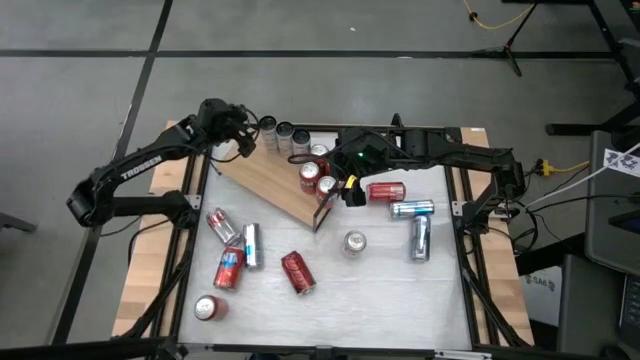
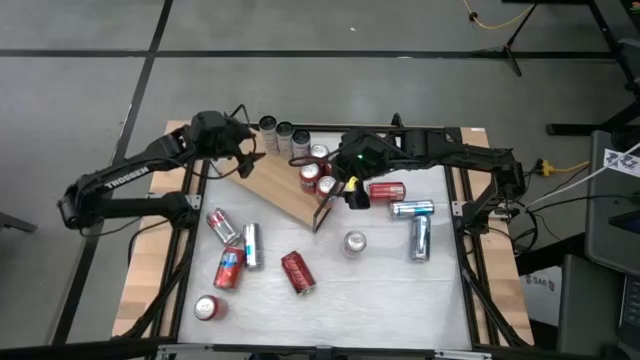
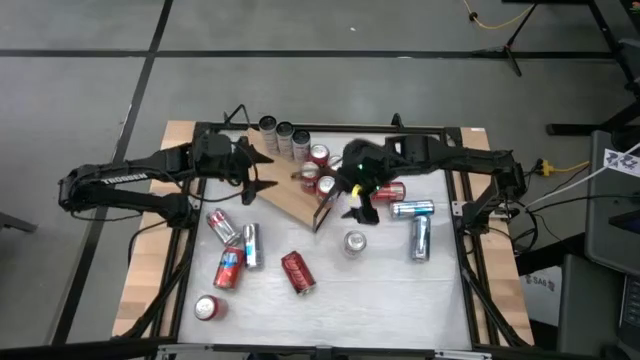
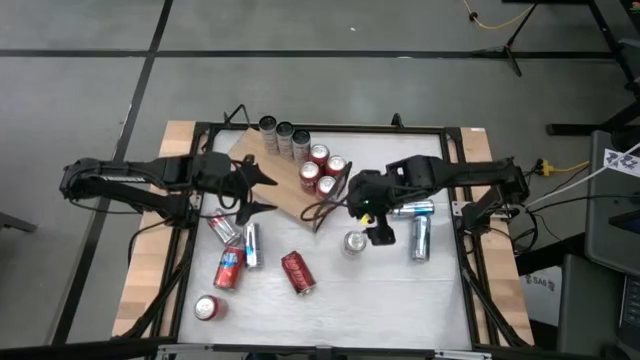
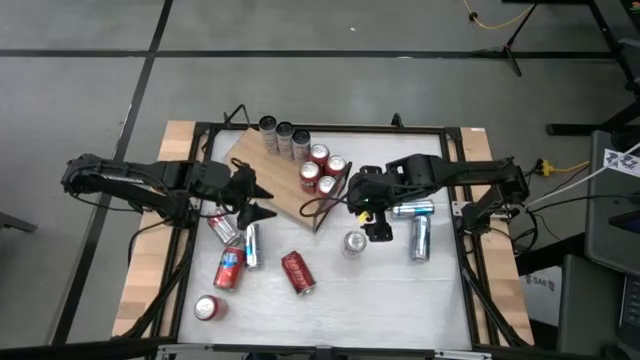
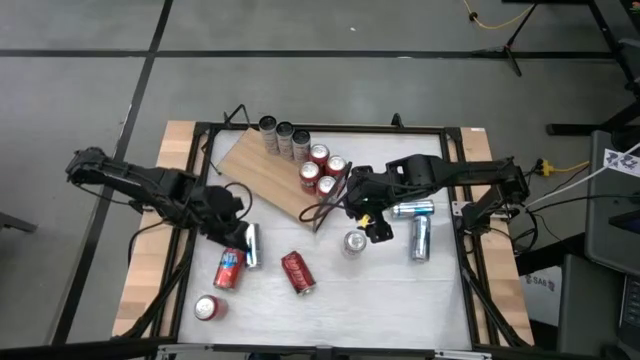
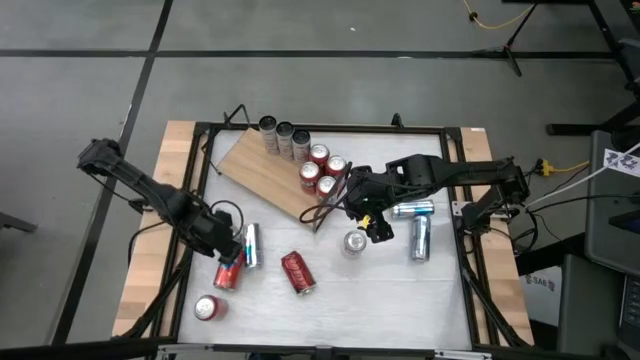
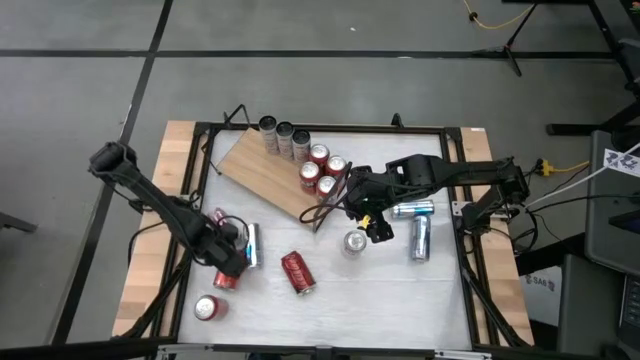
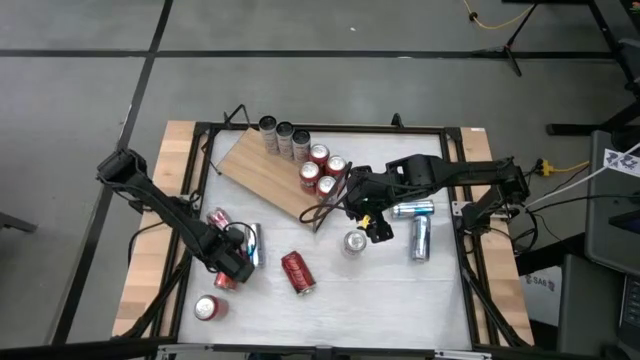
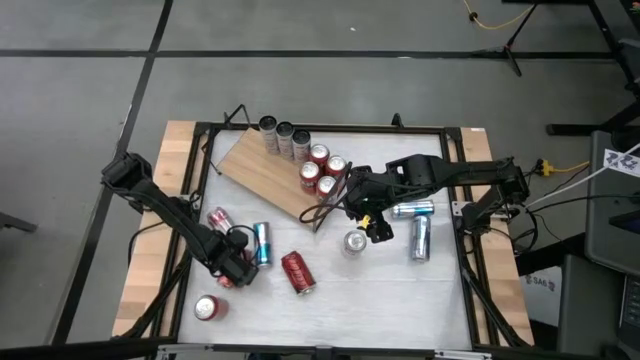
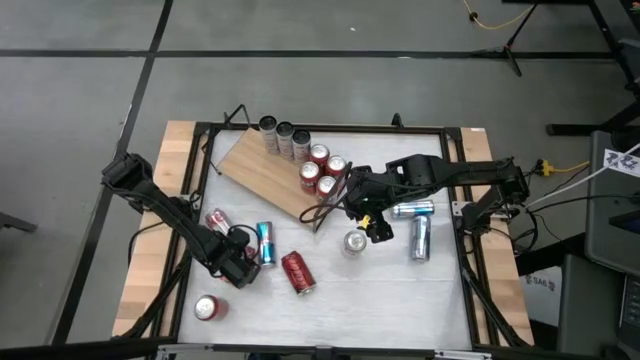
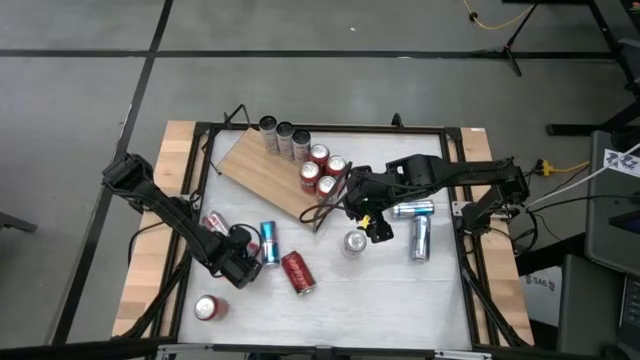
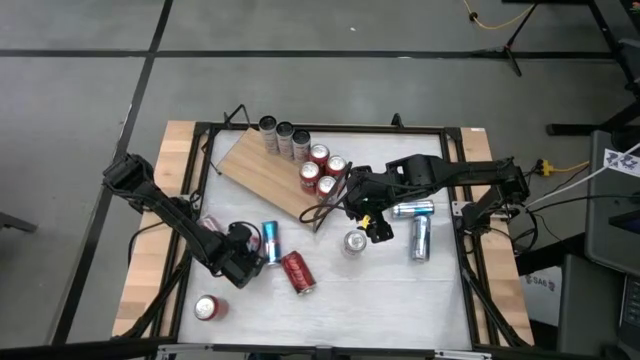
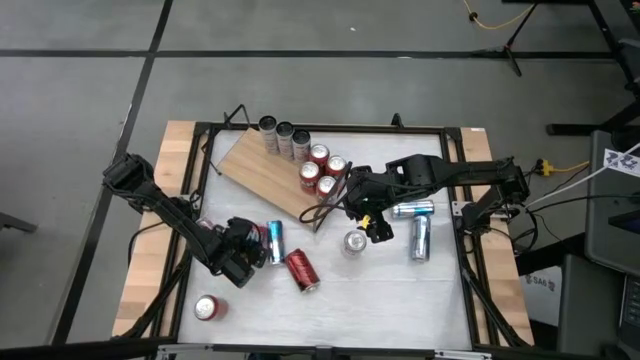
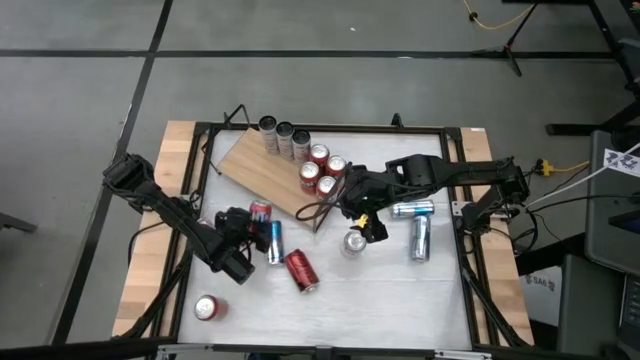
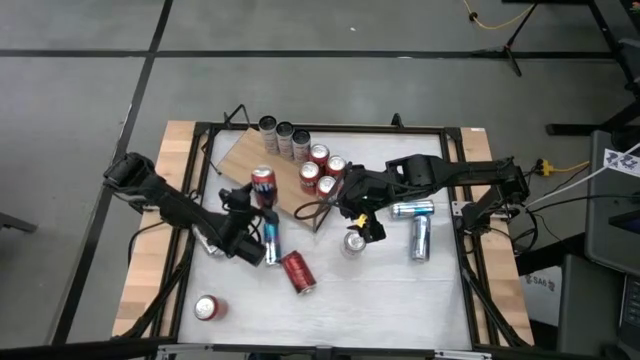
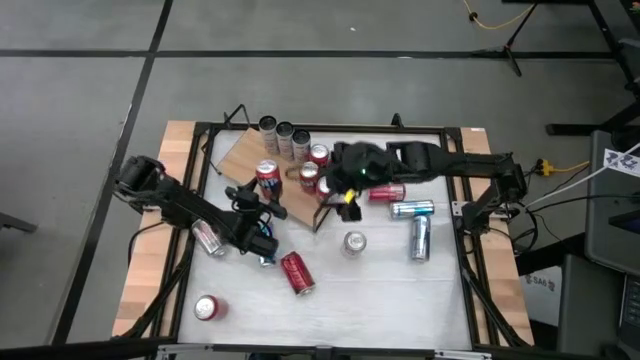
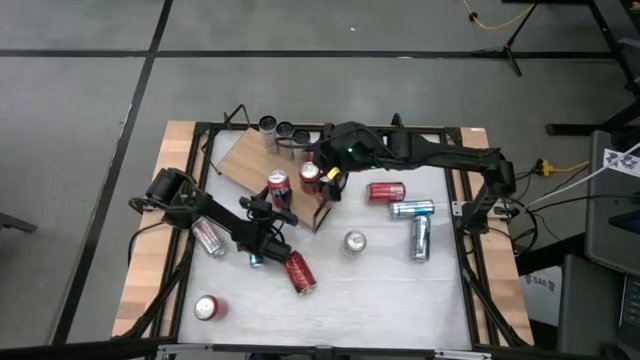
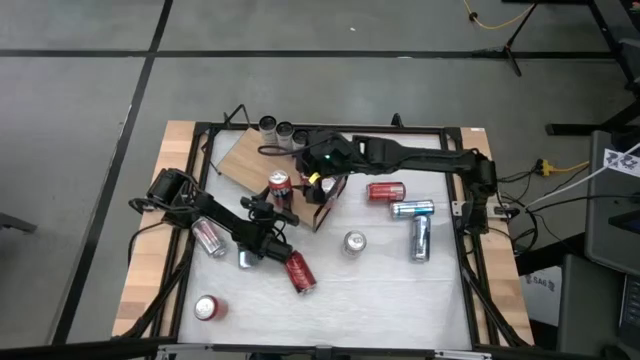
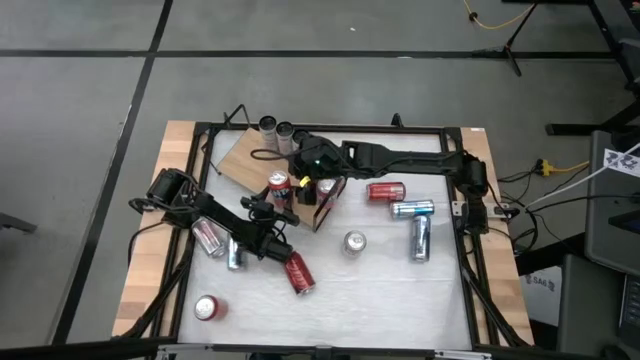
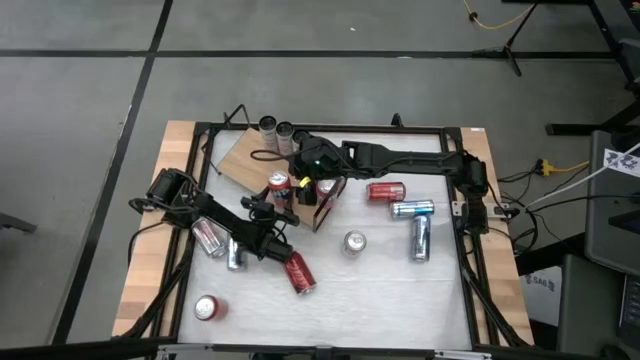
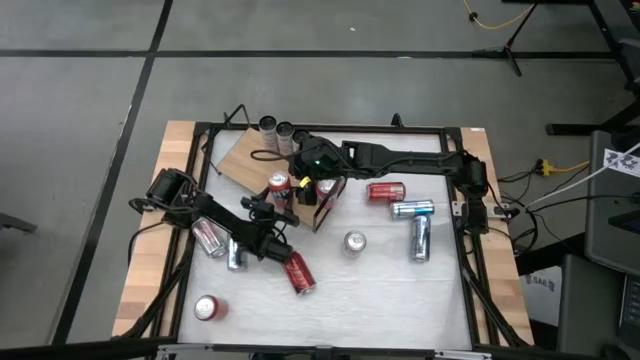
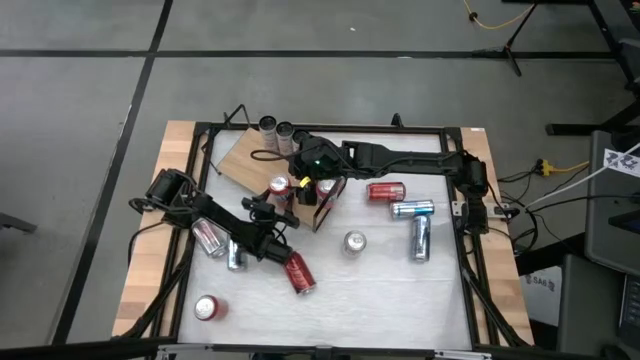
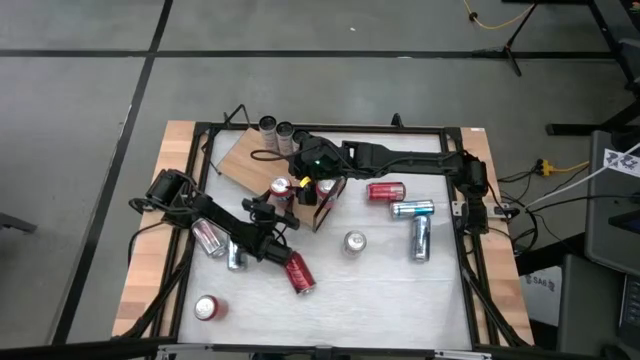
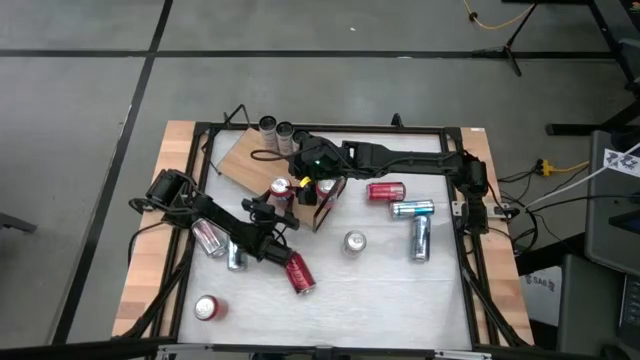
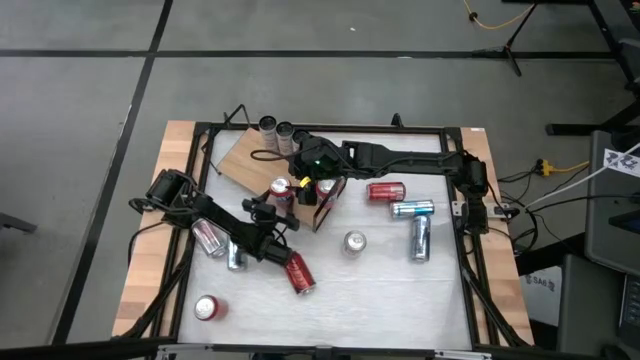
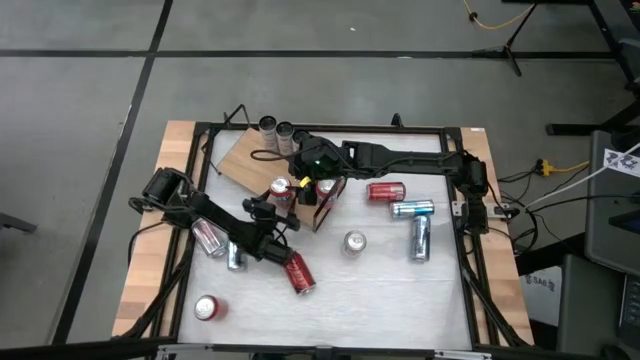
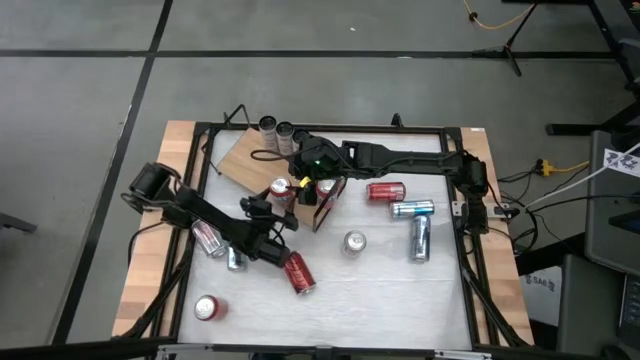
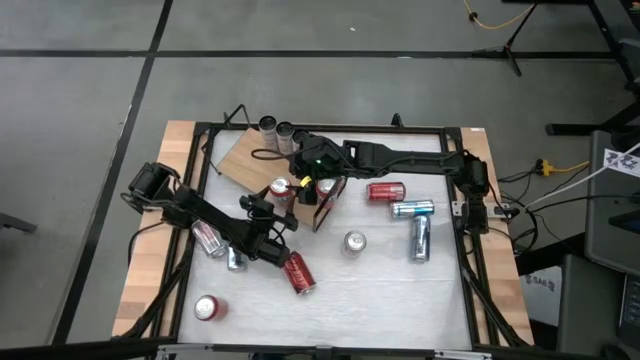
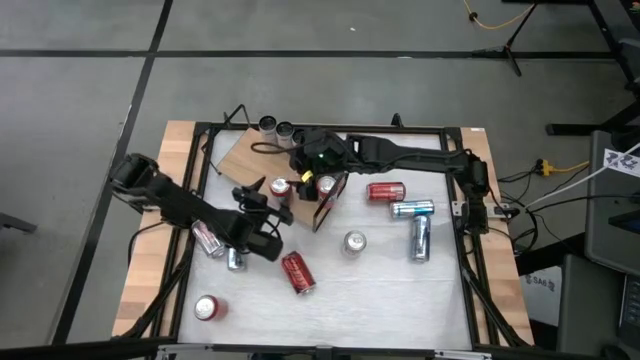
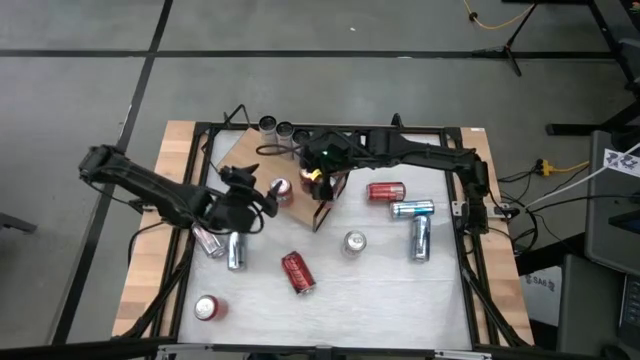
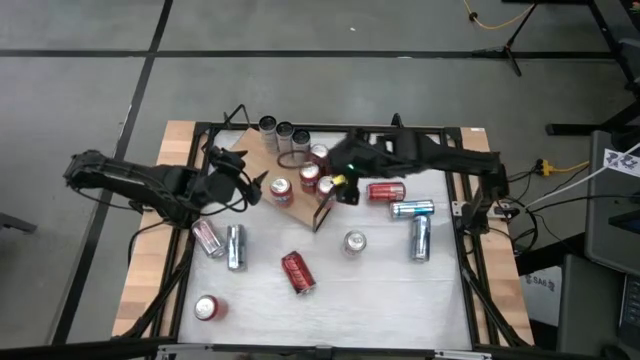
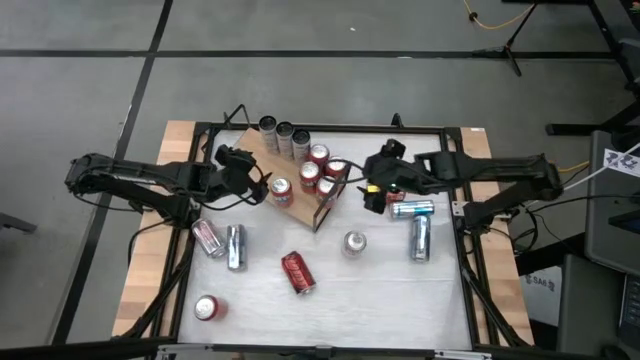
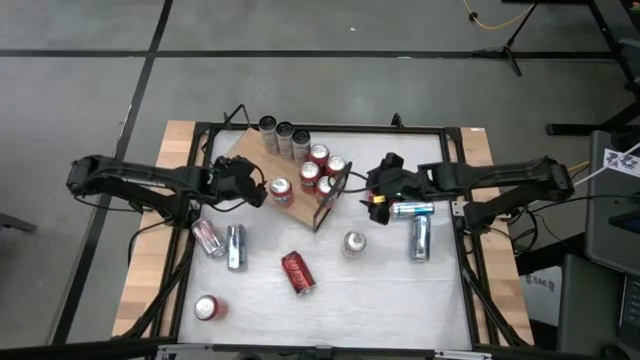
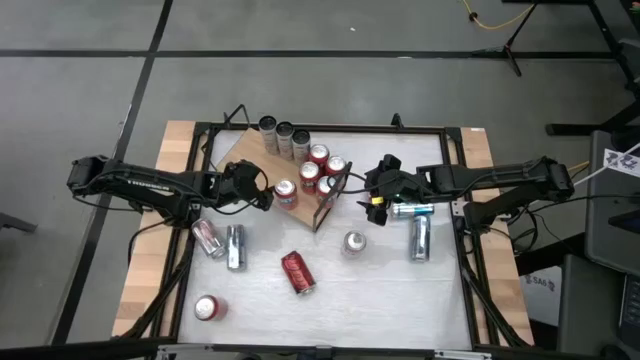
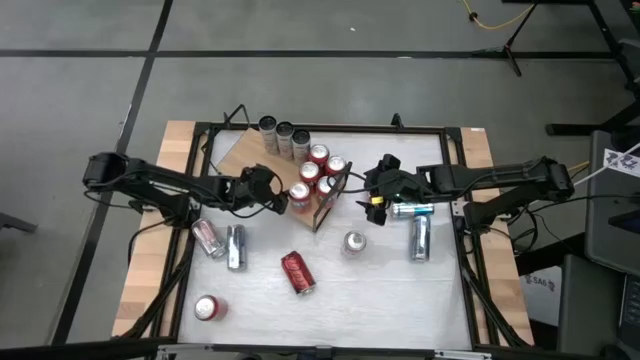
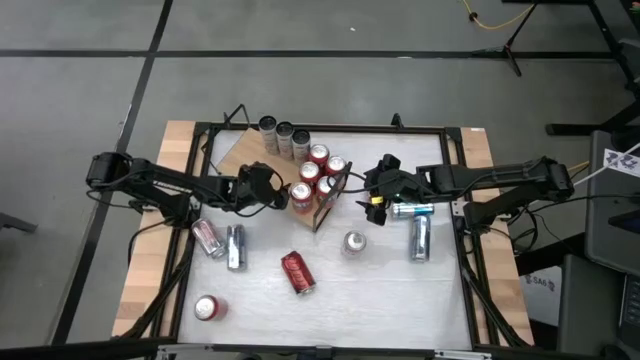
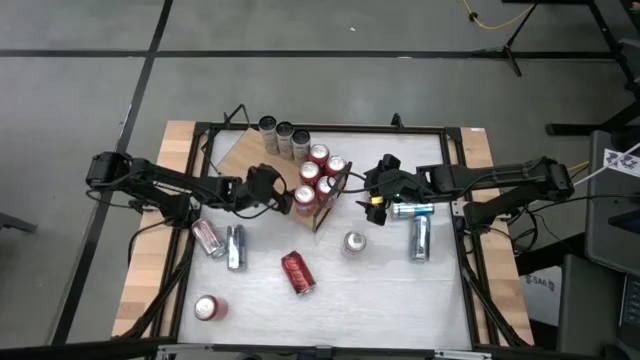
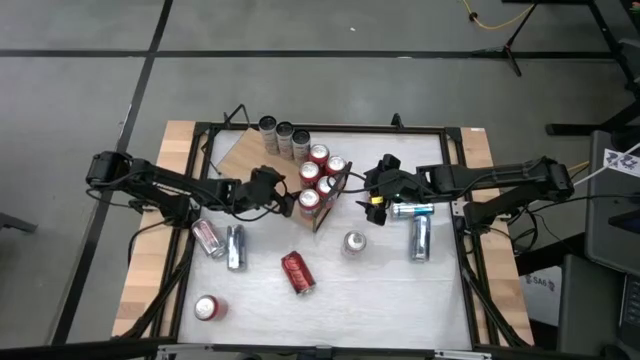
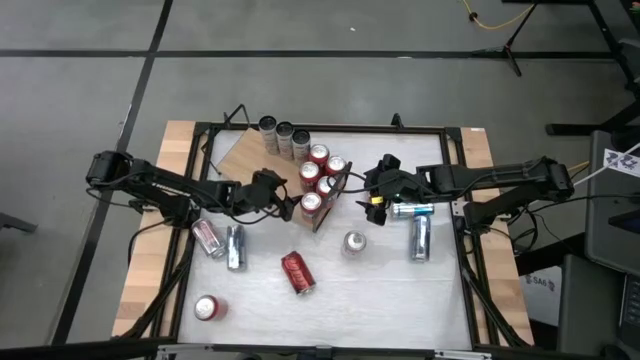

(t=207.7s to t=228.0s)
Task: Pick and place cans onto a shelf
Put the top red soda can on the shelf and align with the other red soda can

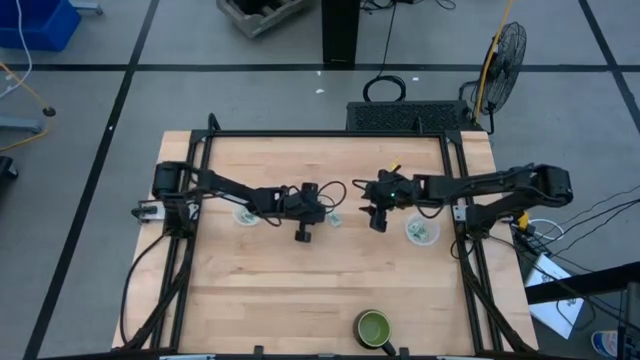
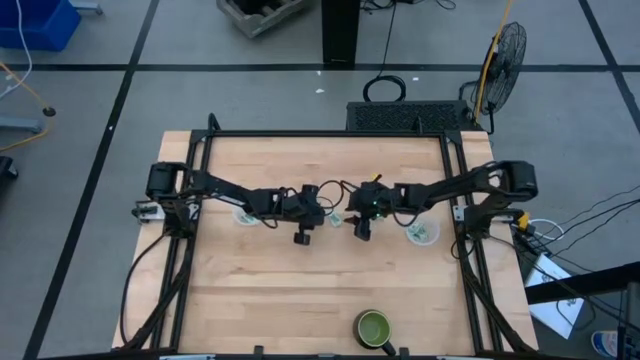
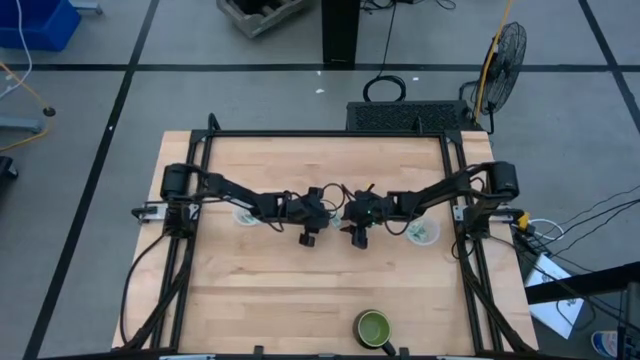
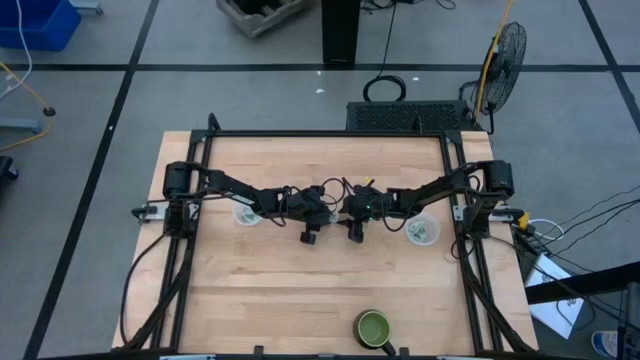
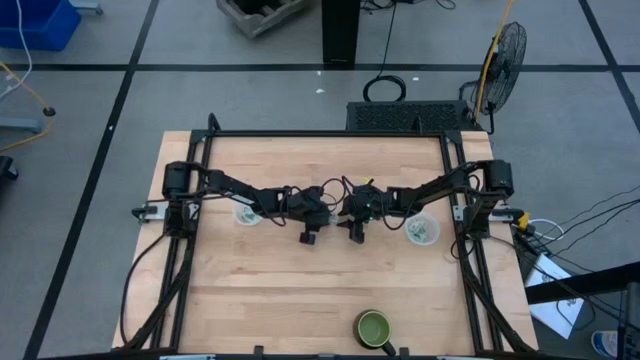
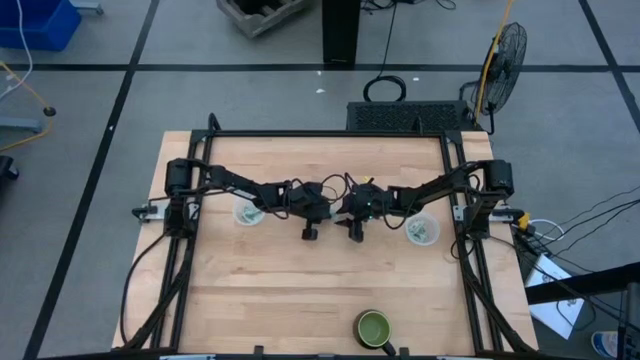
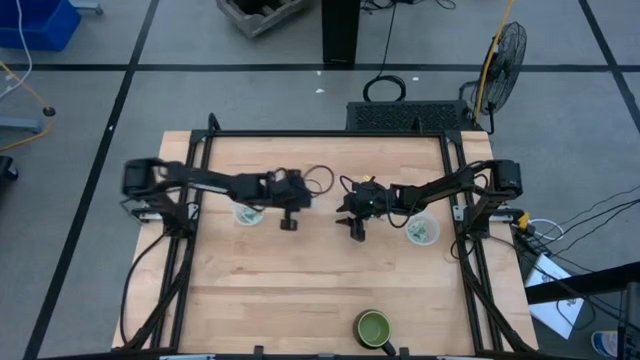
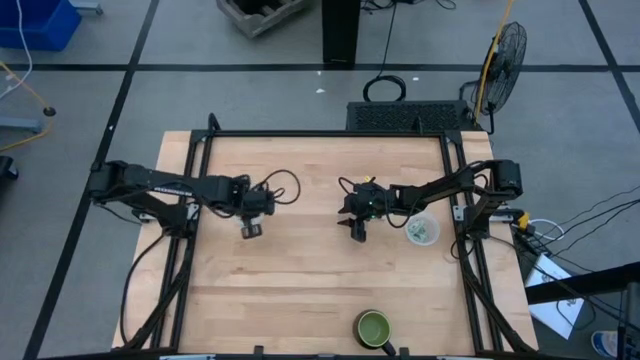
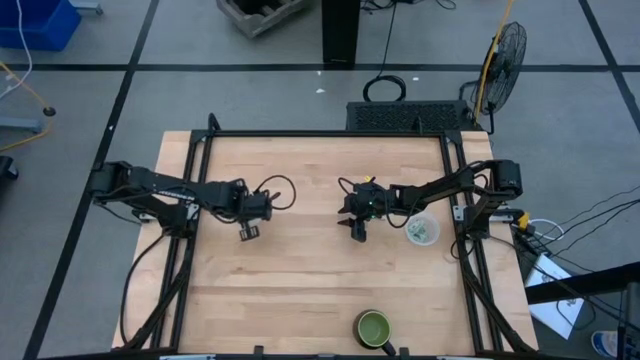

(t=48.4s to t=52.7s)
Task: Pick and place Stevia / Truvia into bins
Put the stevia packet into the left transparent container
